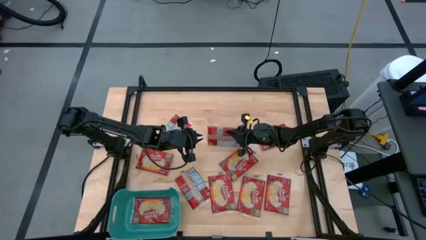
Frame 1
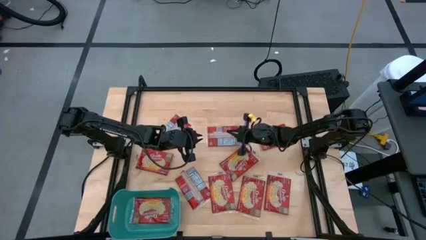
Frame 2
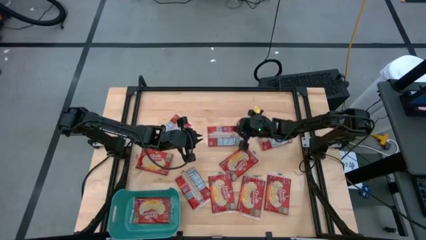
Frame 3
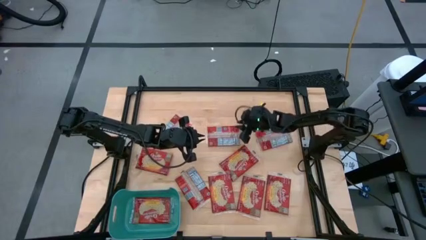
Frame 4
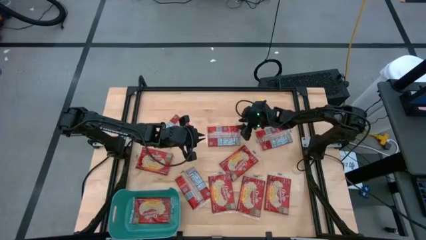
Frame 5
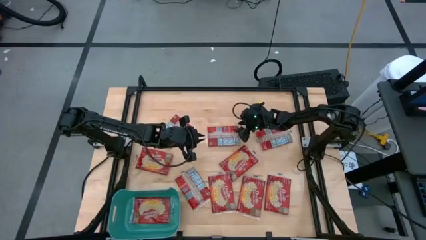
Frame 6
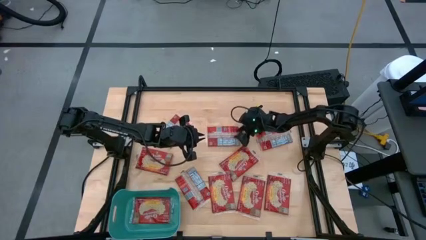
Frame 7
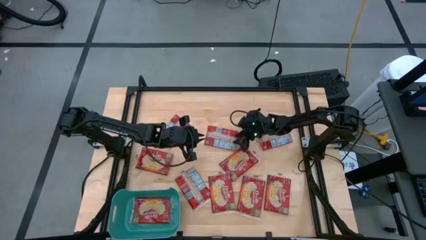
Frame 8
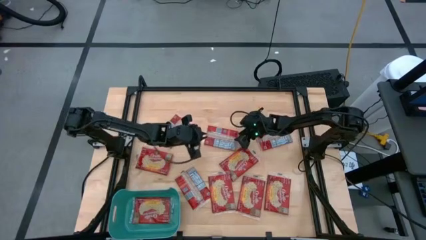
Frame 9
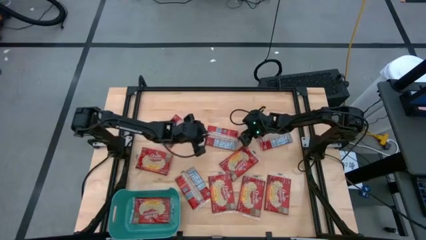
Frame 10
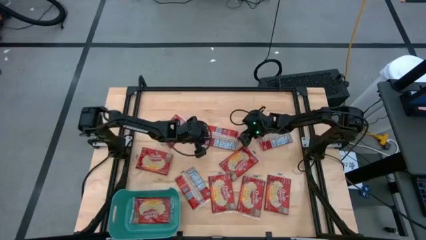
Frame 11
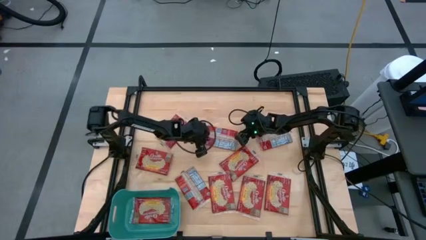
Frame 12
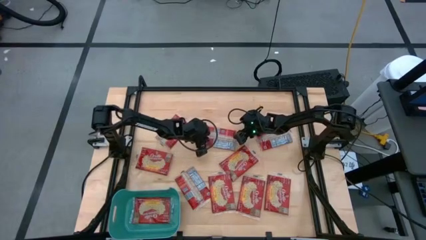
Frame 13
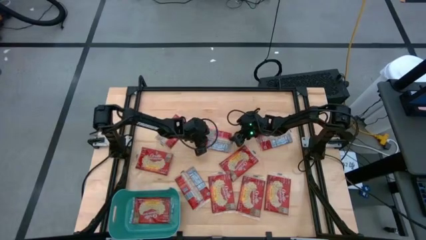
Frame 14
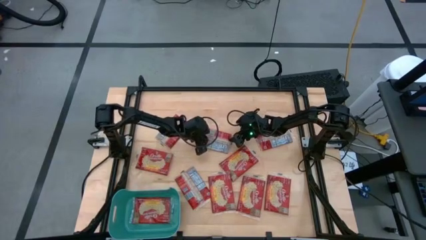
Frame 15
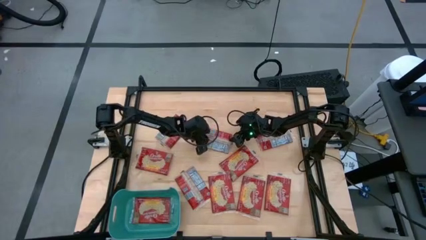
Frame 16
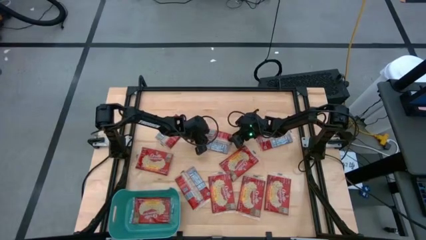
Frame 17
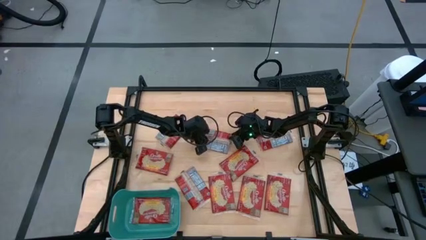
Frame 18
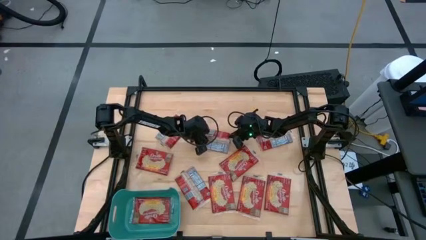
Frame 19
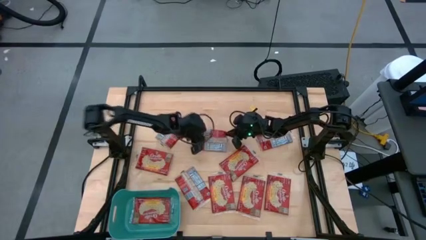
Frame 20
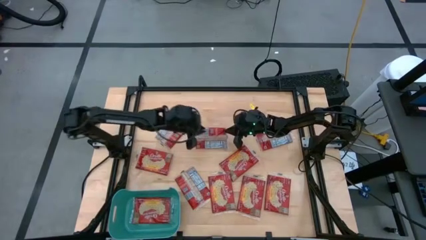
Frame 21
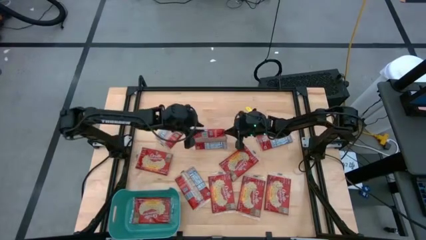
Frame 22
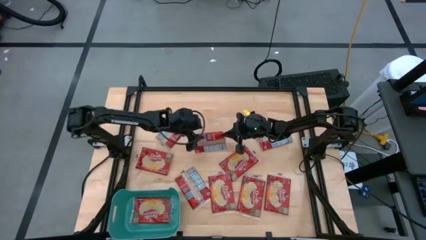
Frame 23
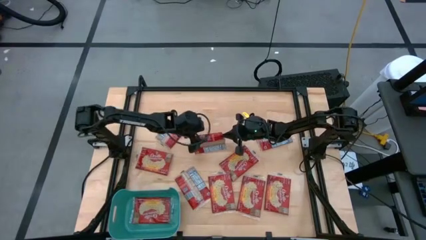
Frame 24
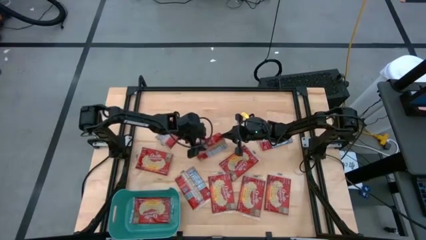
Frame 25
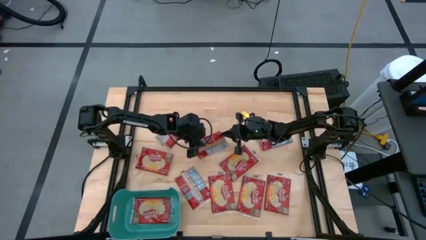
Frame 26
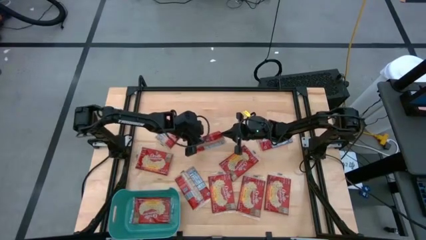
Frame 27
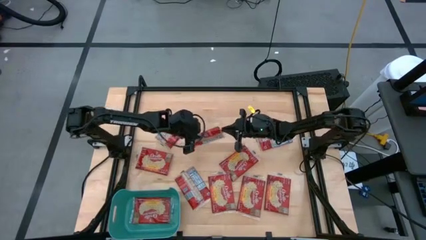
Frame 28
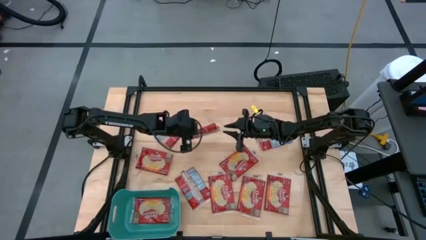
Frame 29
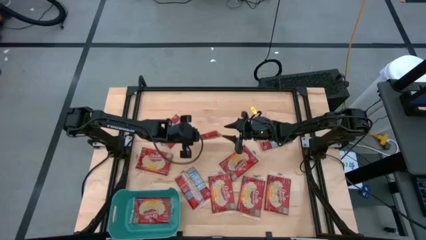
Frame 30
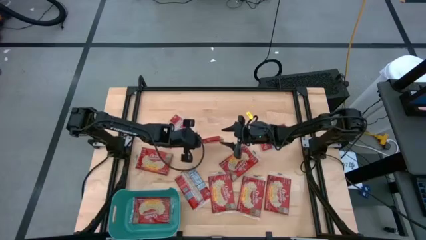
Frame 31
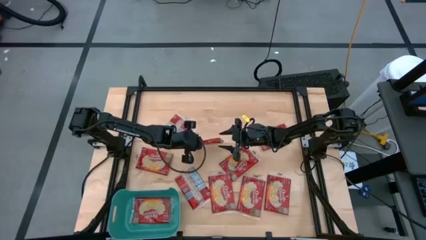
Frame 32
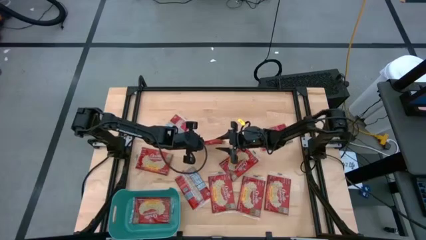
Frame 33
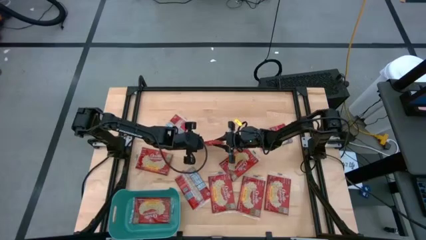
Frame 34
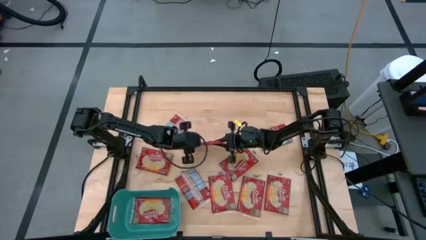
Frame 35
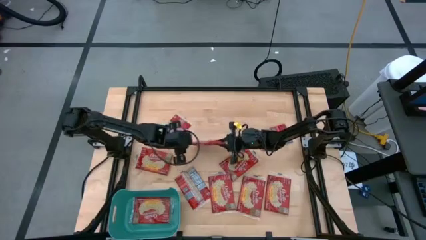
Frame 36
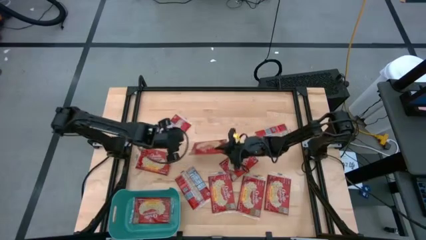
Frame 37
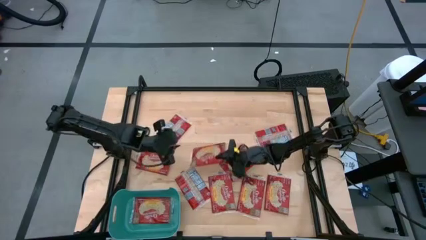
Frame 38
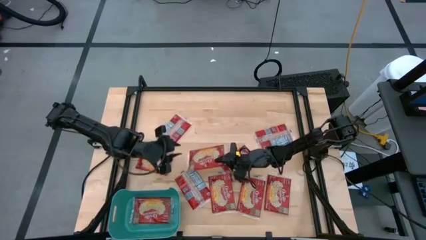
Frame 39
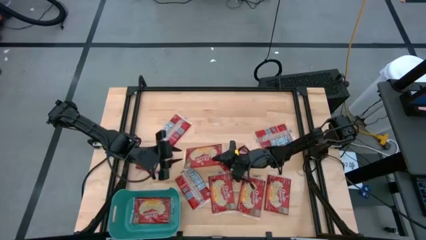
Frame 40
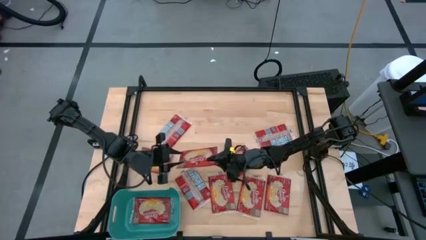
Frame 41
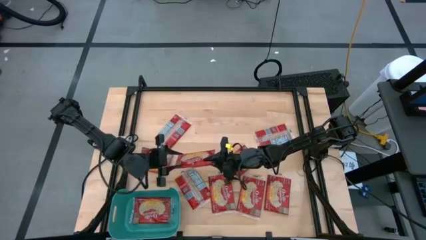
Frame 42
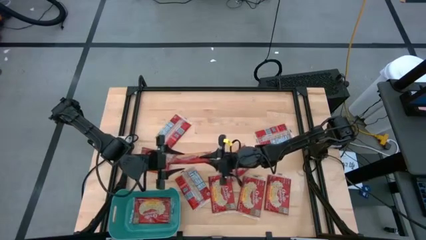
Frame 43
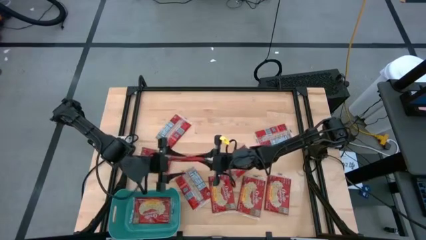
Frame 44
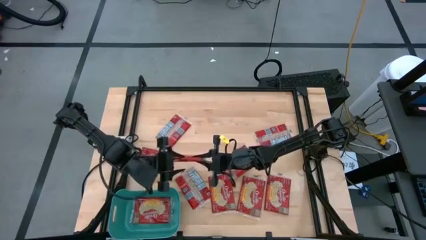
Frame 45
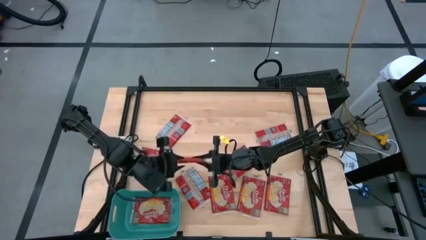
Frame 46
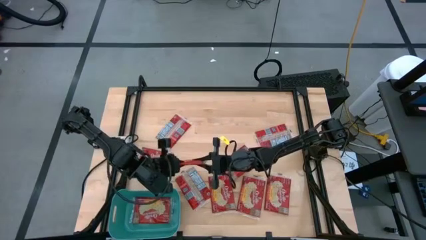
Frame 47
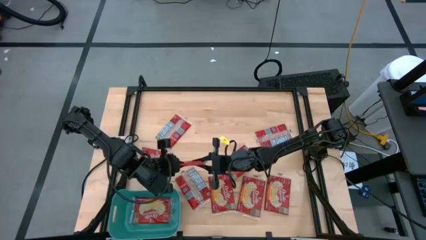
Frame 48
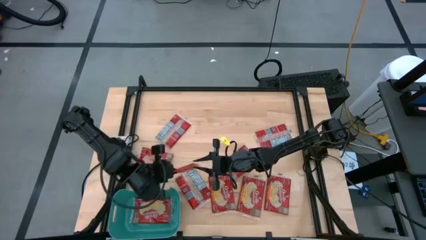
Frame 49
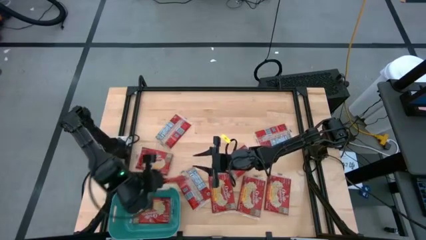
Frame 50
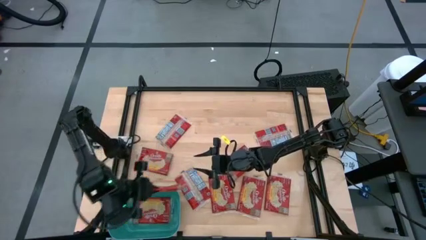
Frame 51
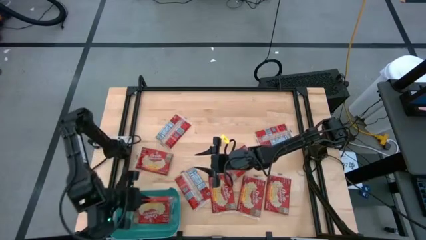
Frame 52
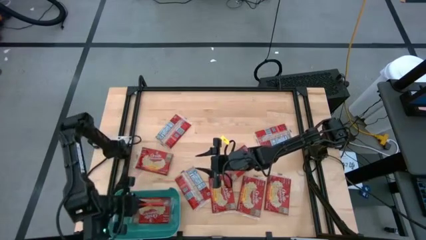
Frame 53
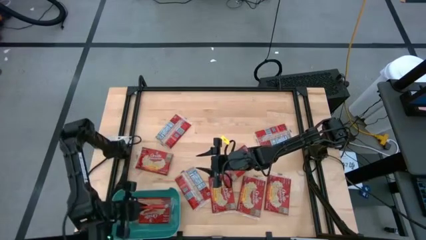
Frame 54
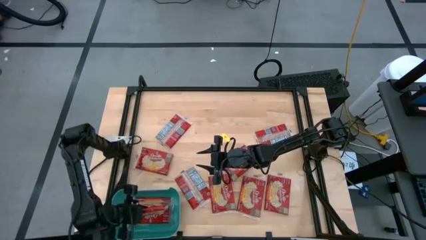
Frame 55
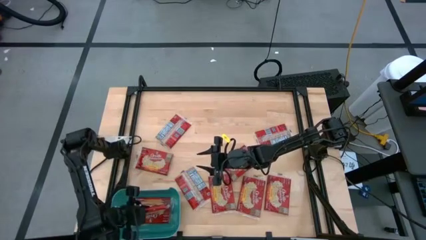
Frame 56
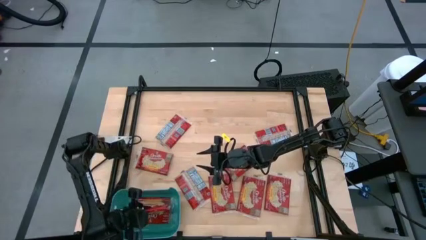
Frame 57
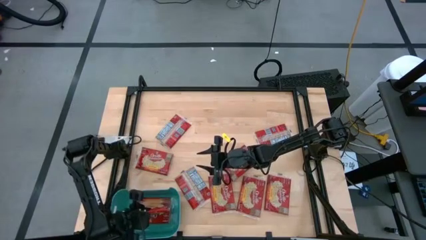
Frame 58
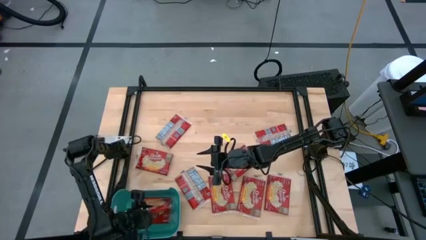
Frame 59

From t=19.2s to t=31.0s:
Task: Sort popcorn bags into baskets
Put the red popcorn bag into the blue container

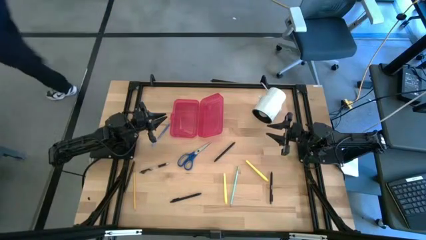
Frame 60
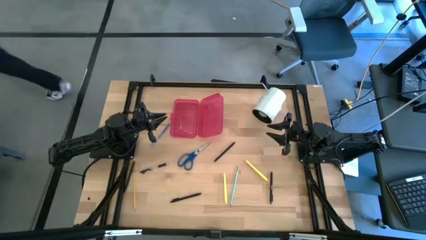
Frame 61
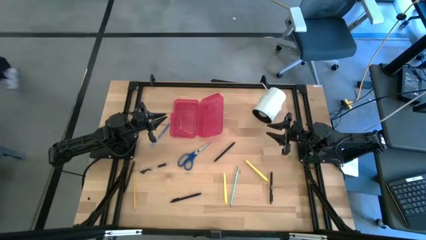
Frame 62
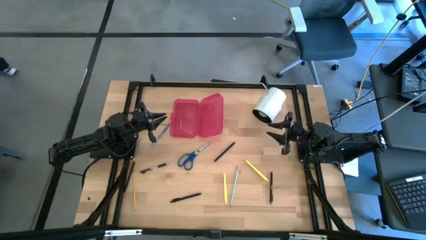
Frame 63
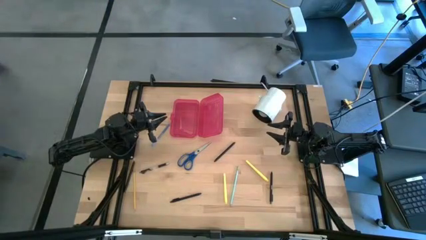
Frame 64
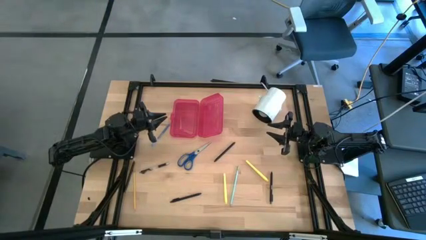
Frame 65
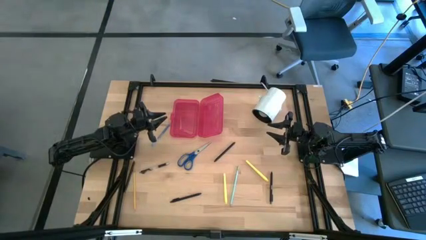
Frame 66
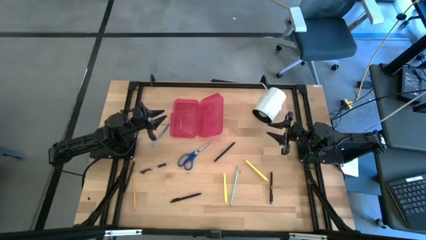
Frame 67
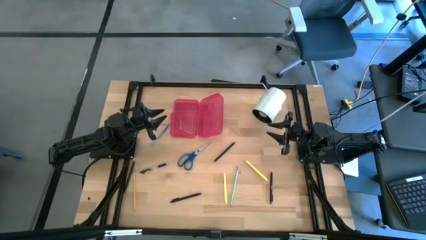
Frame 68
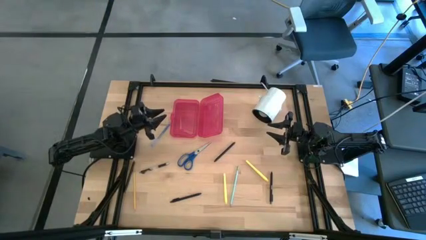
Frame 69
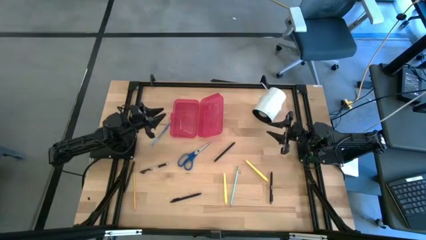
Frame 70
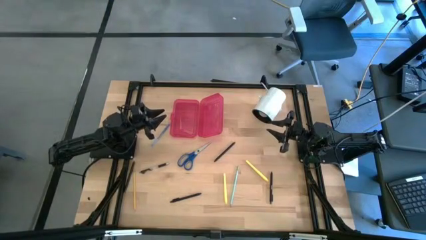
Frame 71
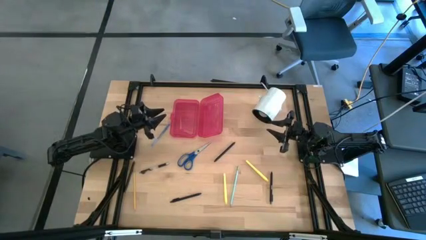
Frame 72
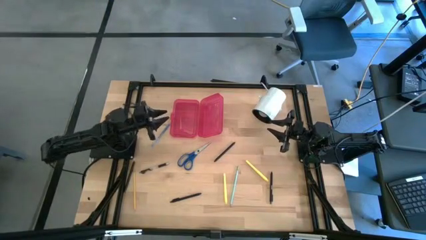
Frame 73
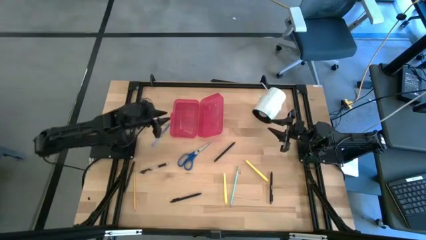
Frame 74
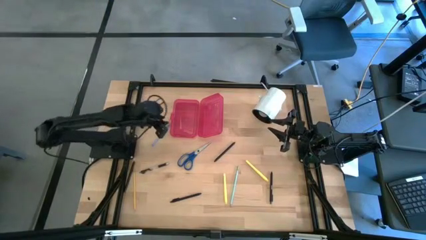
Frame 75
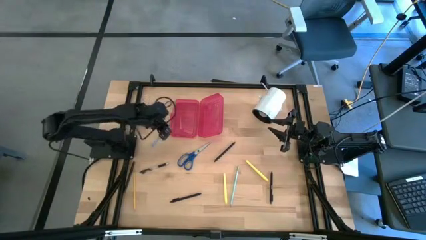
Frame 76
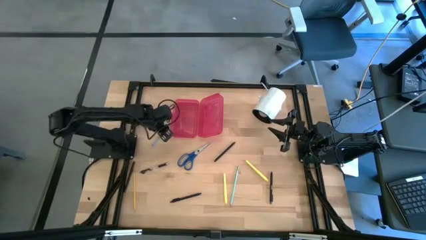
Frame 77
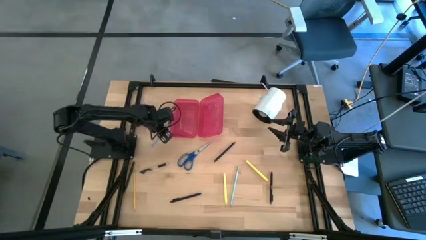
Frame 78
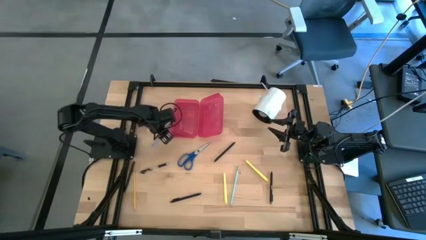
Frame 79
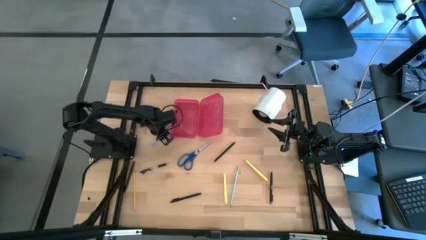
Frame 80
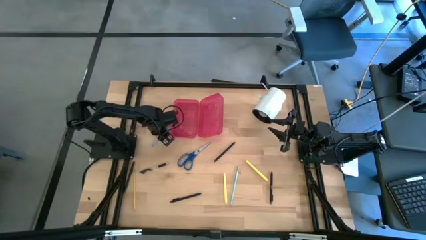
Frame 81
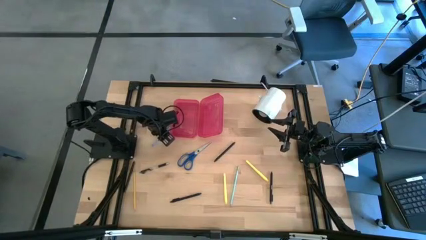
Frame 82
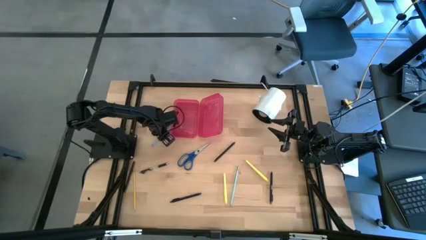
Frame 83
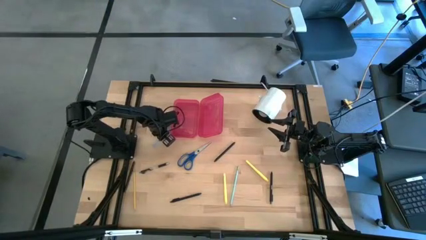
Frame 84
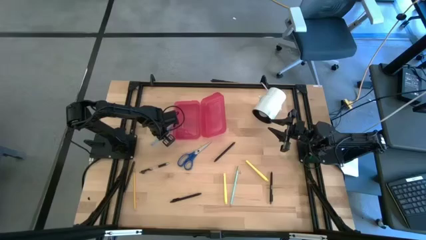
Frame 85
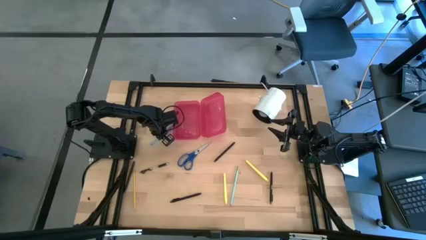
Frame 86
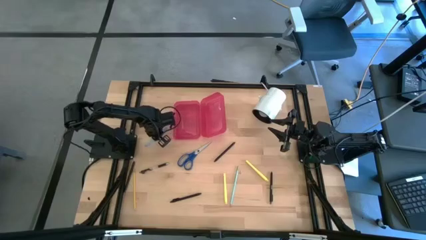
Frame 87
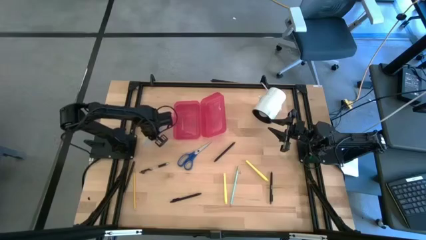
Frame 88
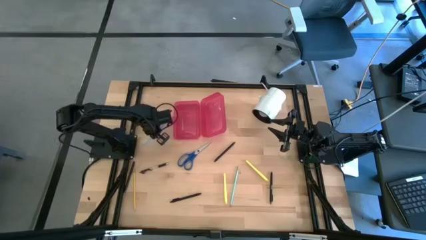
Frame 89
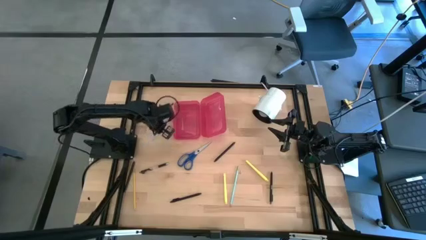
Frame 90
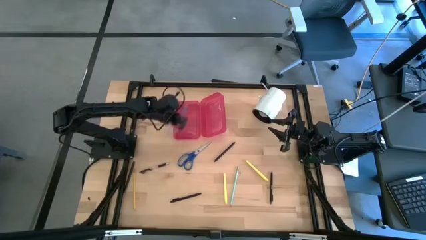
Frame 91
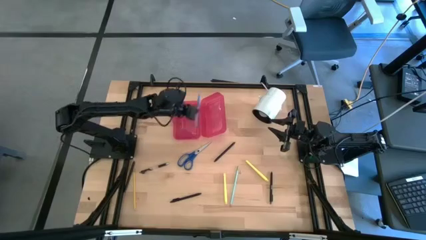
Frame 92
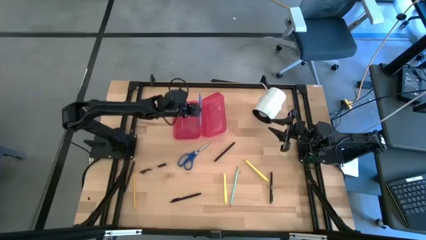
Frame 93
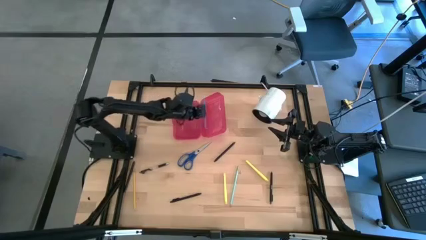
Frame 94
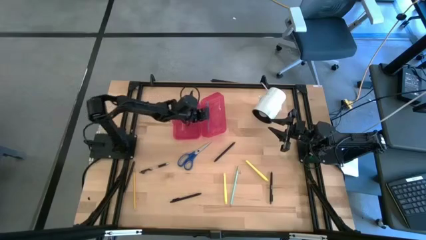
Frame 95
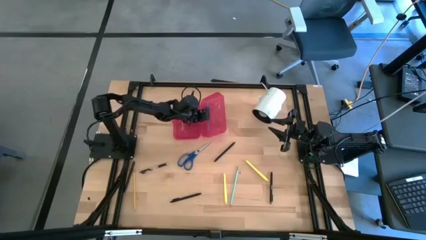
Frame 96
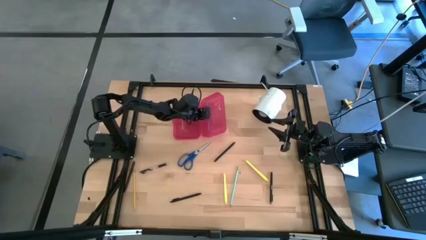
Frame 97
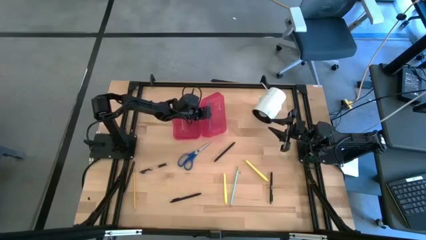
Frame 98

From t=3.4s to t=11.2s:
Task: Pick & place school supplies into a supply box
Put the blue pen into the red supply box
